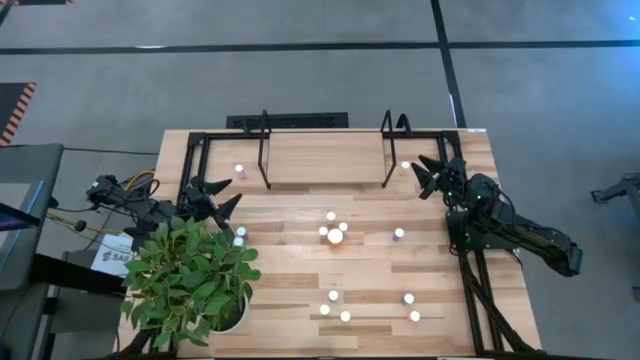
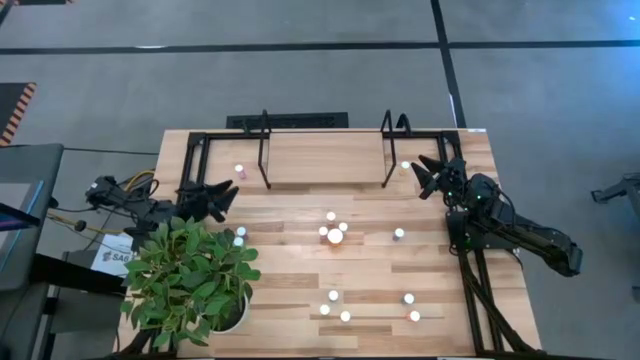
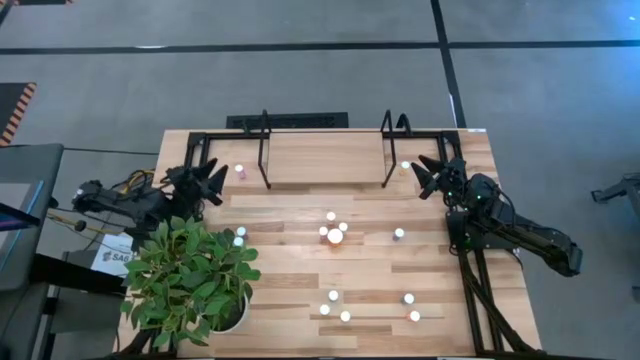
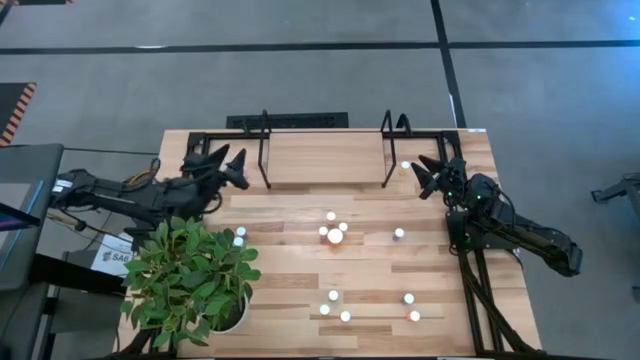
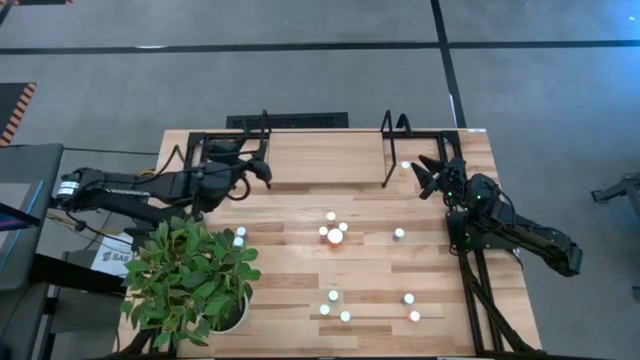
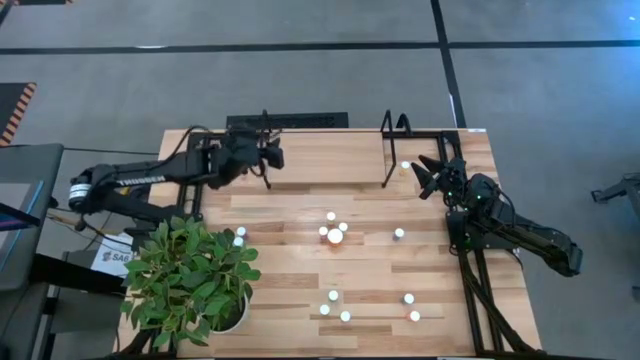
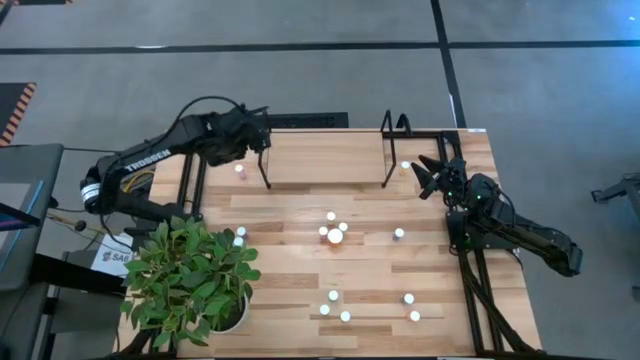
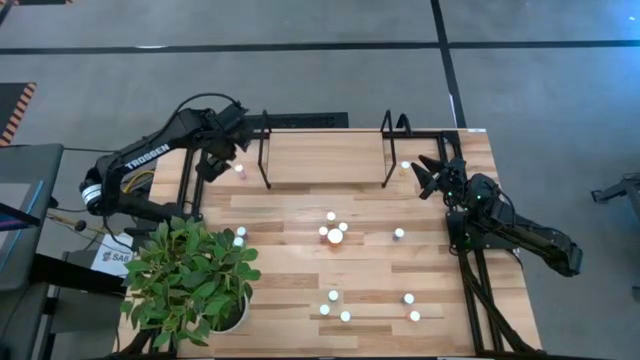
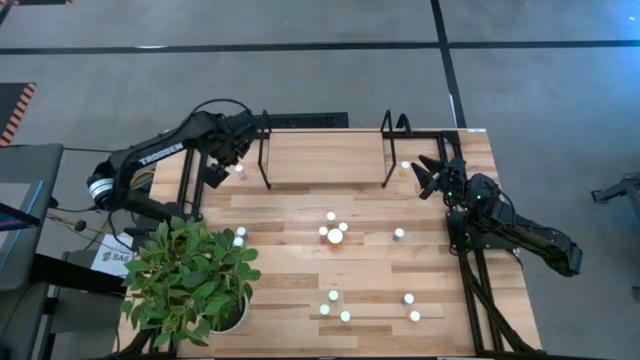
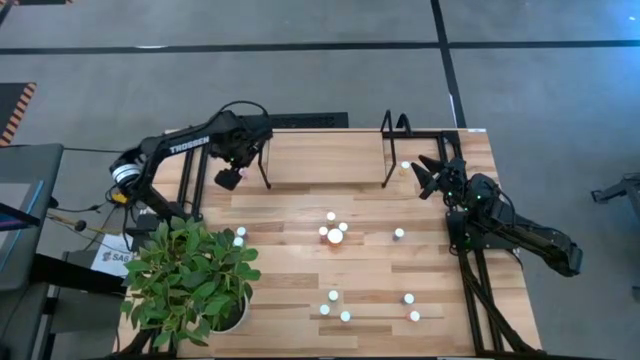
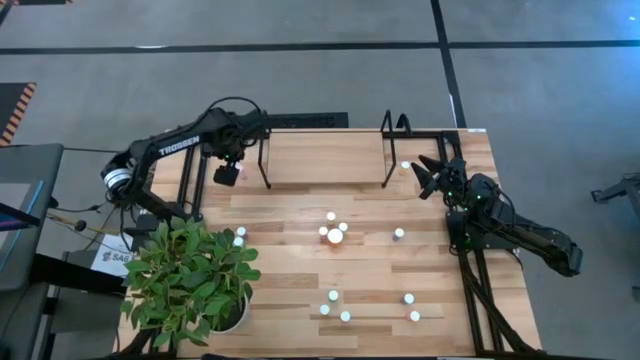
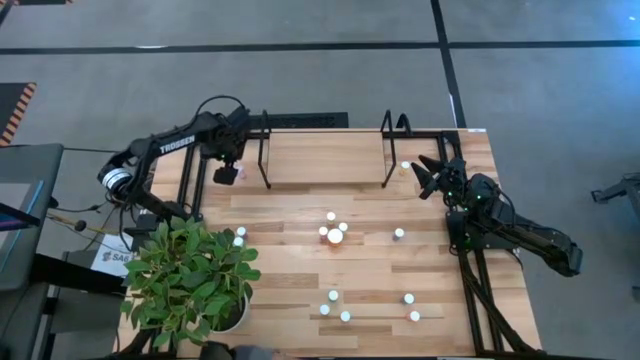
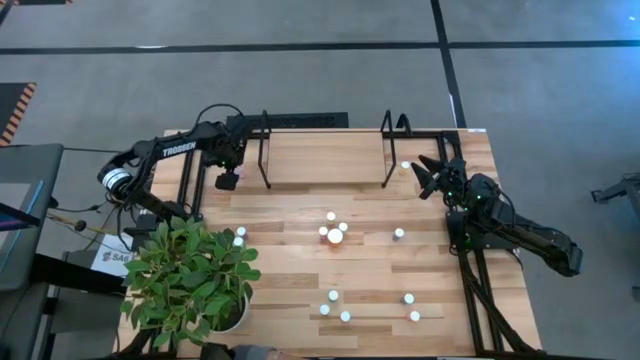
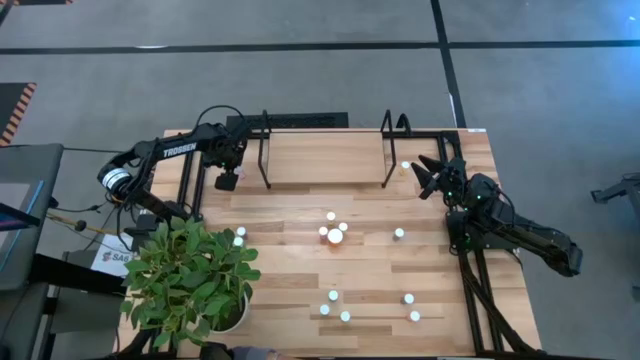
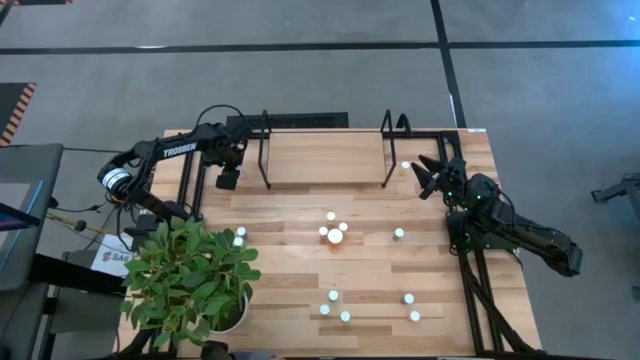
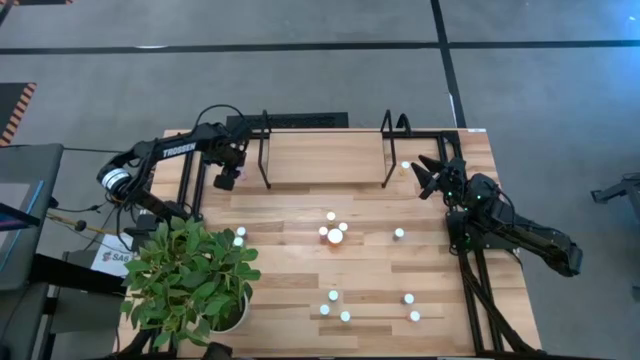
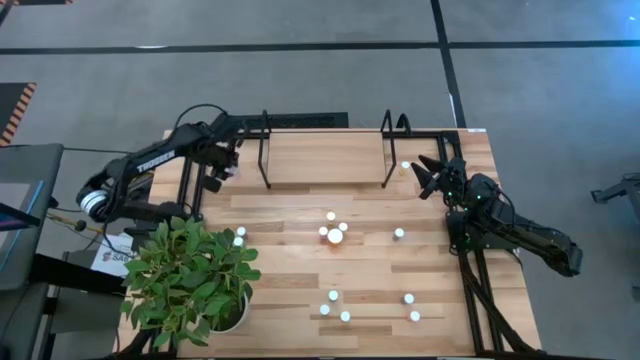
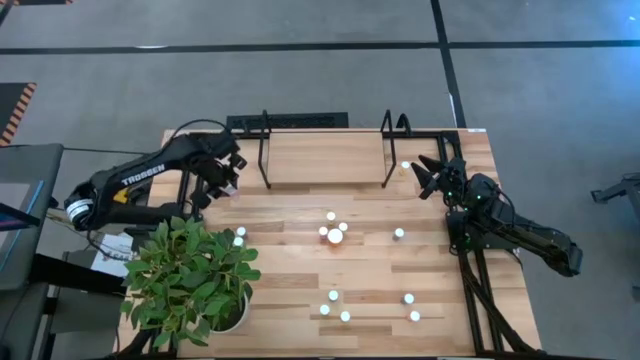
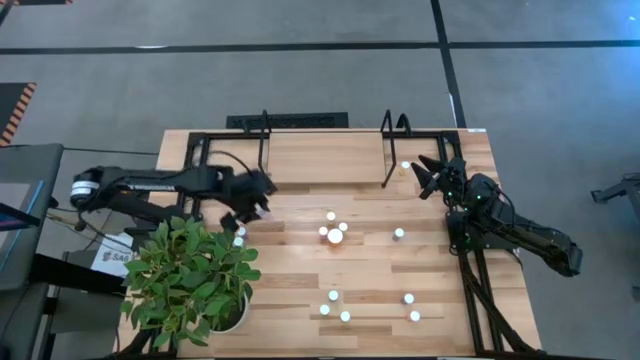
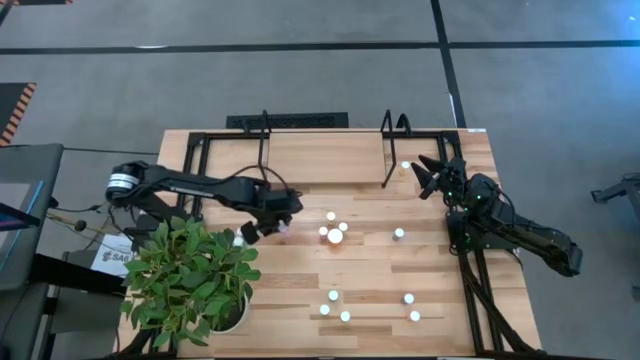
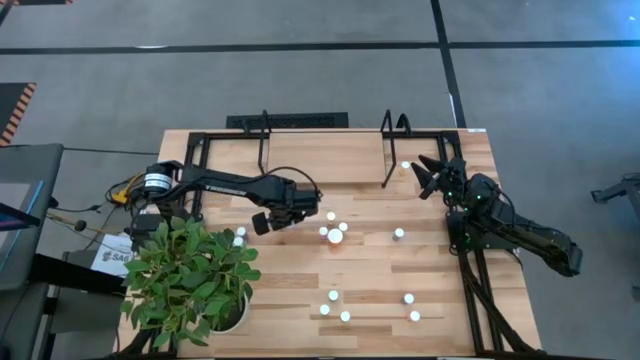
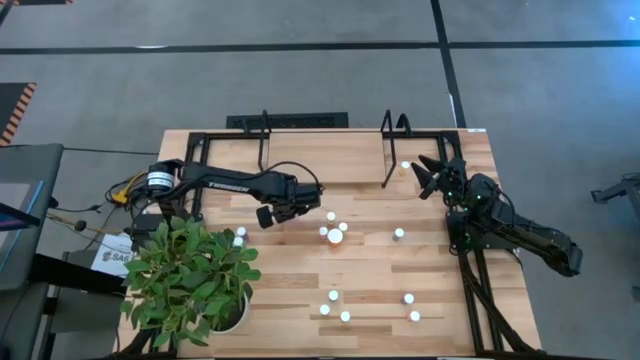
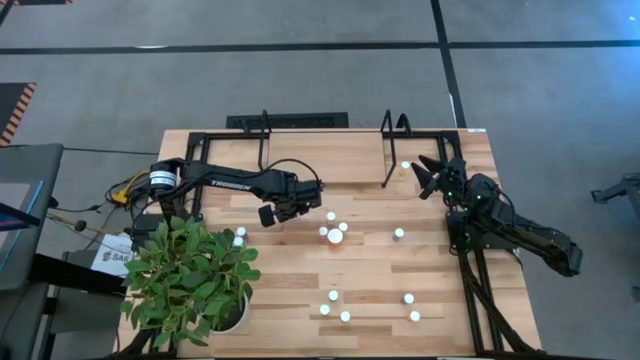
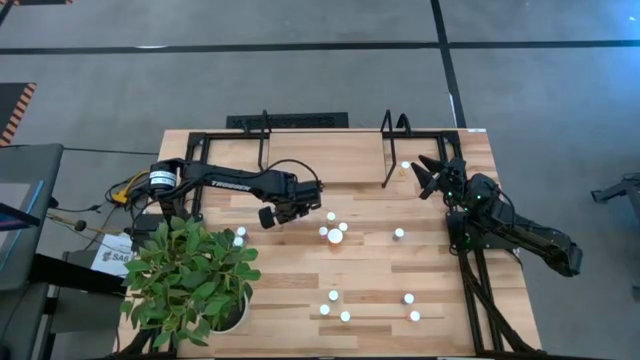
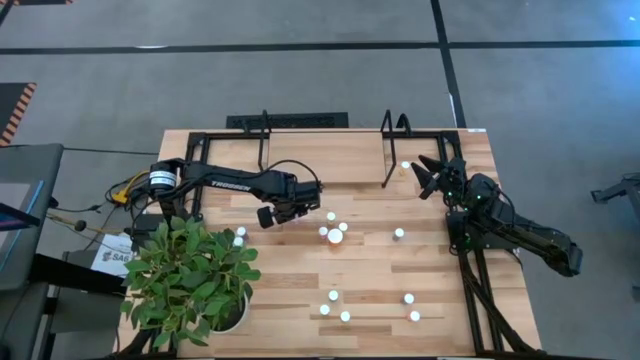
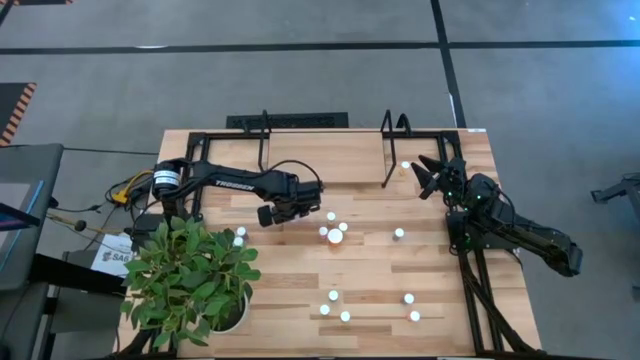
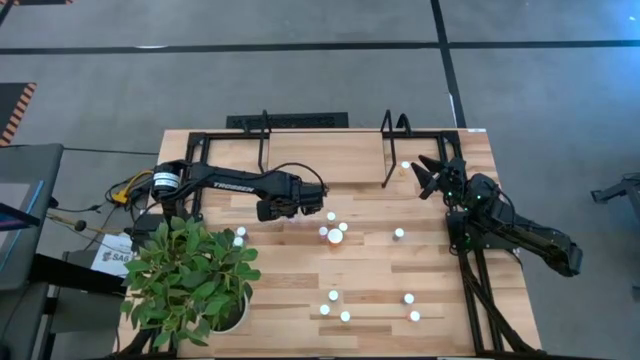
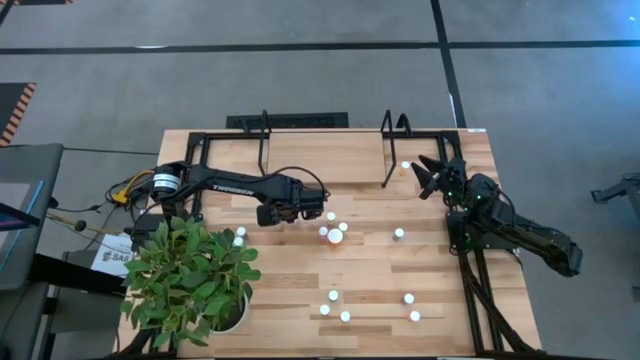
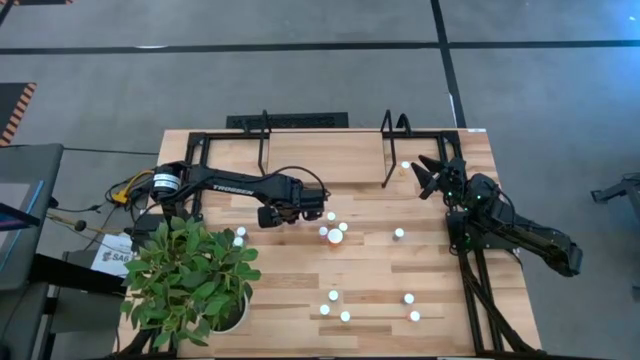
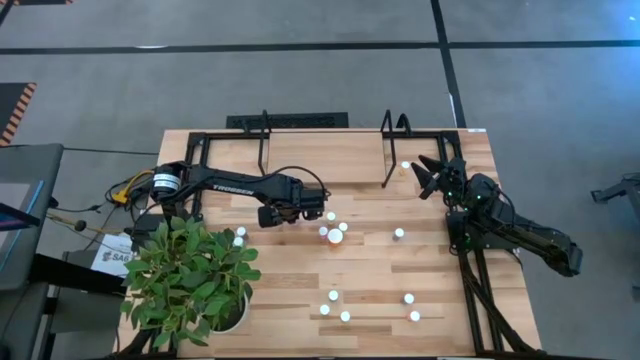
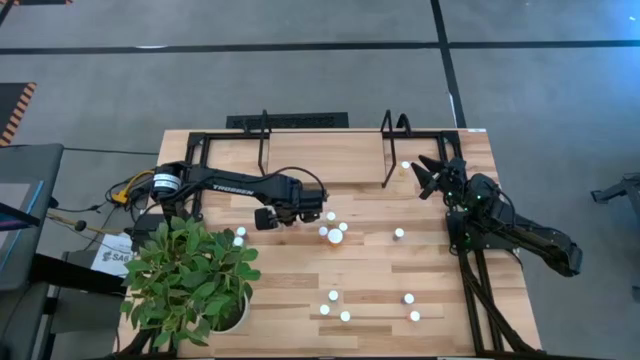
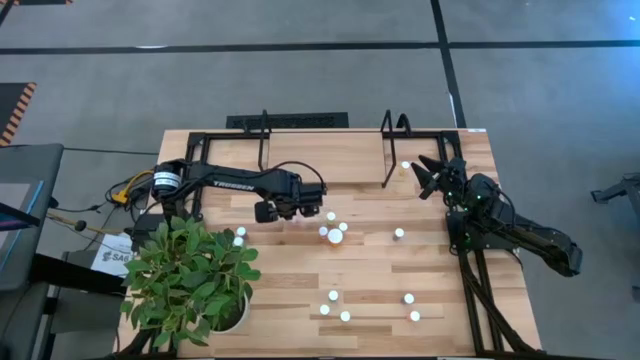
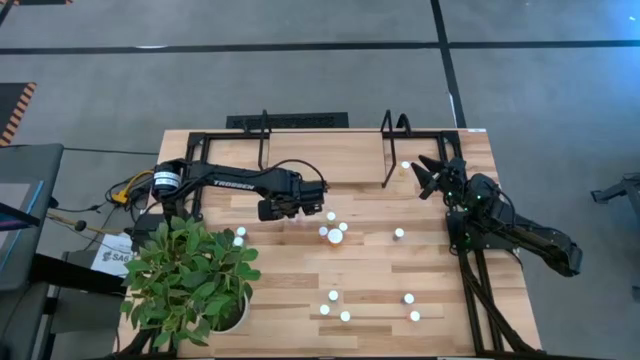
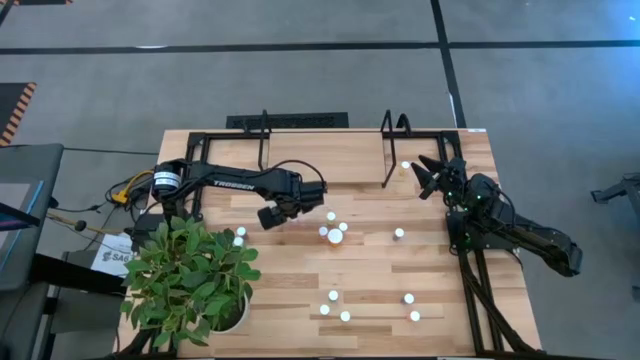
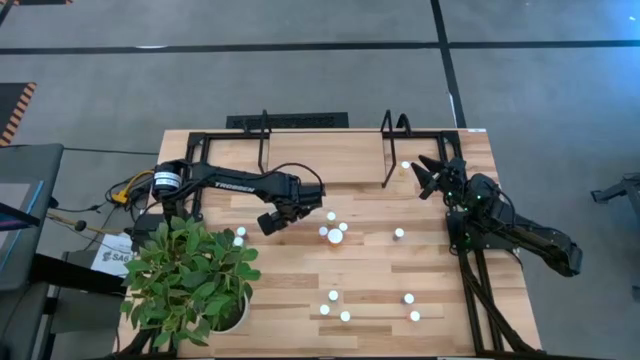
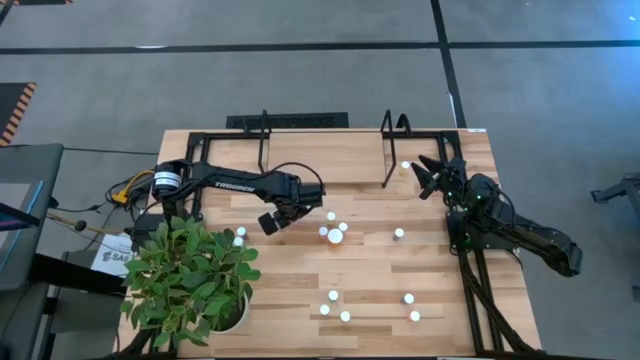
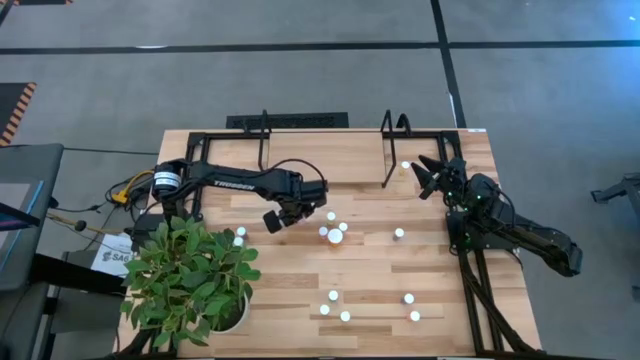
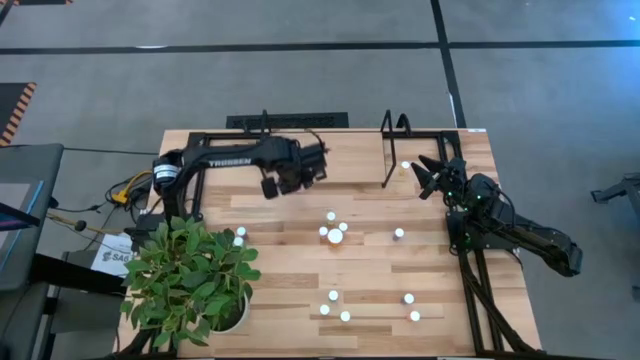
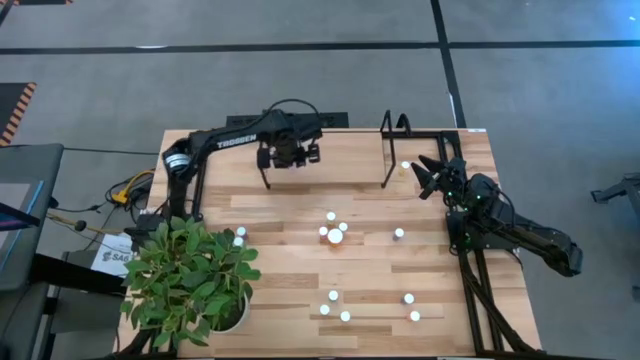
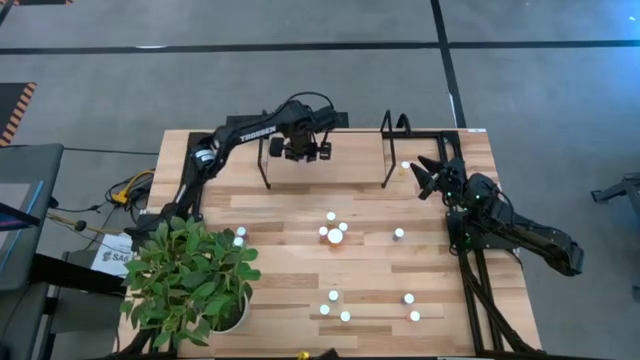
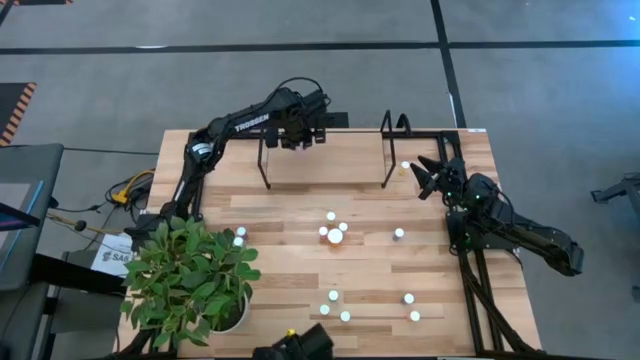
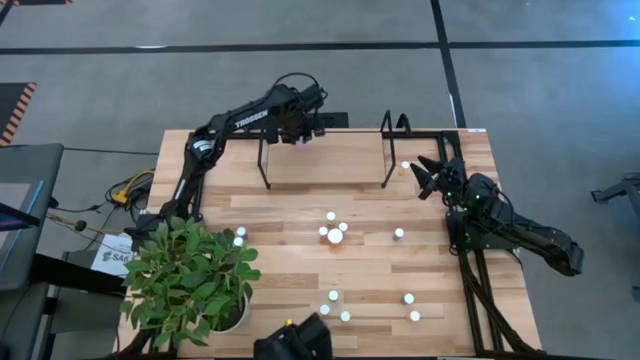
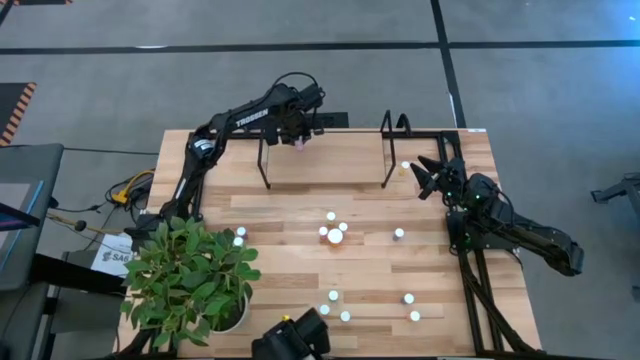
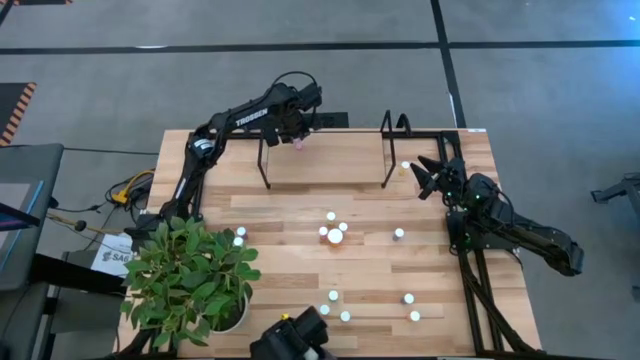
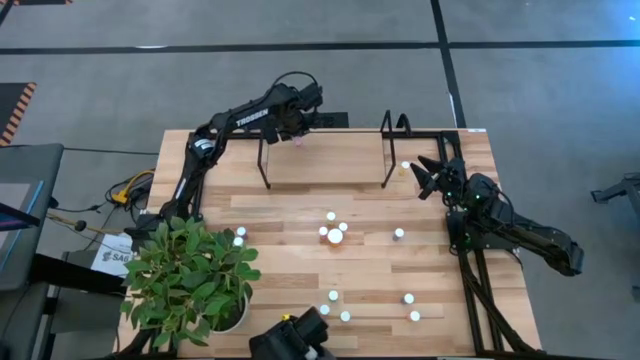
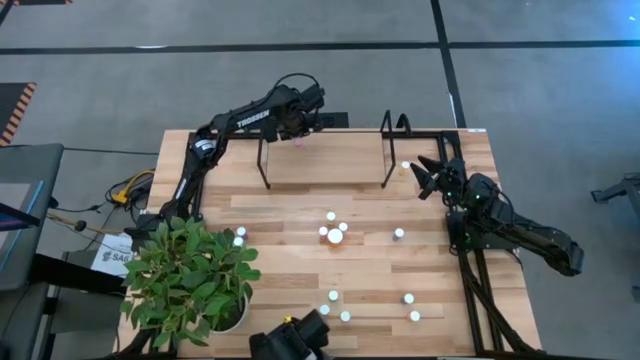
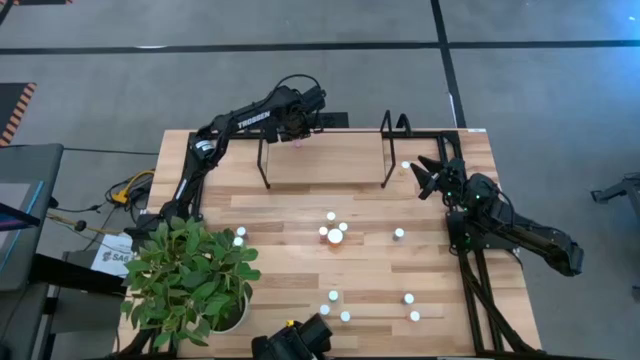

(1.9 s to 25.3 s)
Task: Pick and place medicine bottles onto shelf by color
Put the pink pill bottle on the shelf
